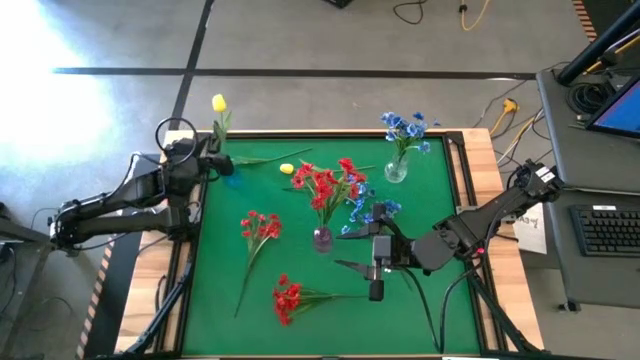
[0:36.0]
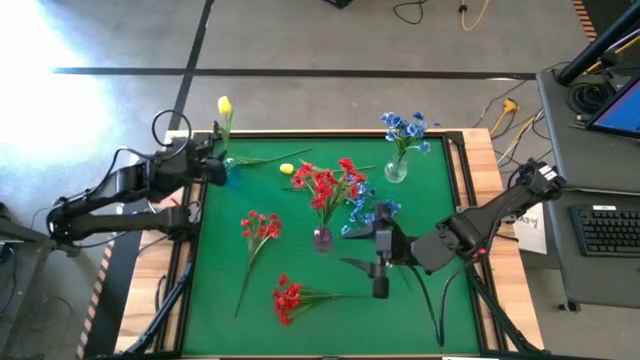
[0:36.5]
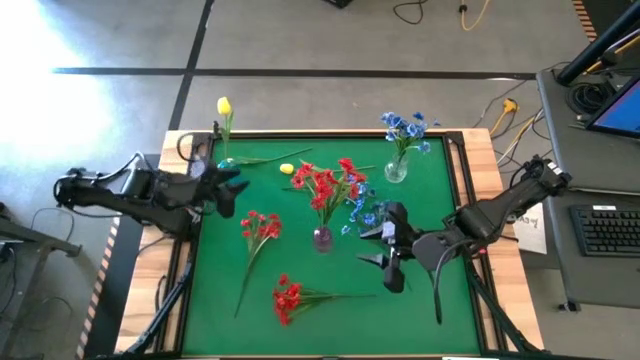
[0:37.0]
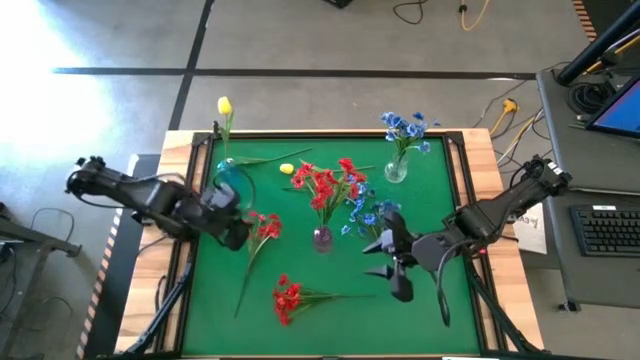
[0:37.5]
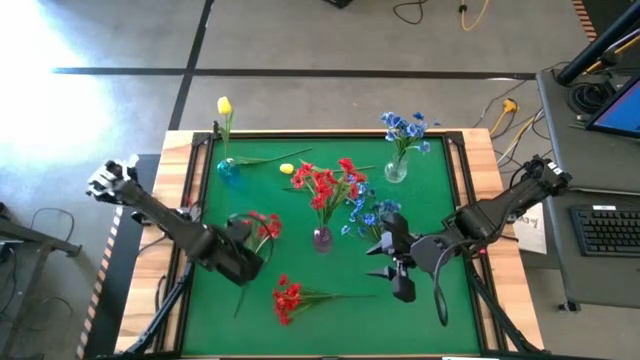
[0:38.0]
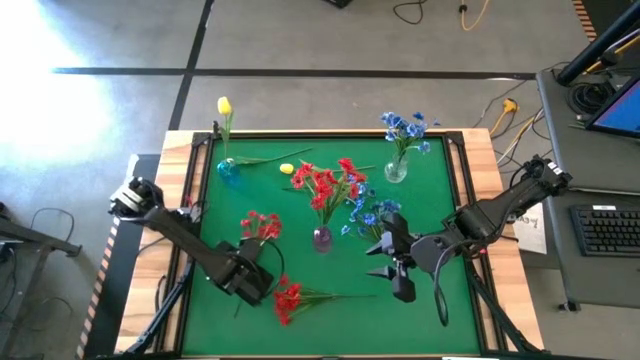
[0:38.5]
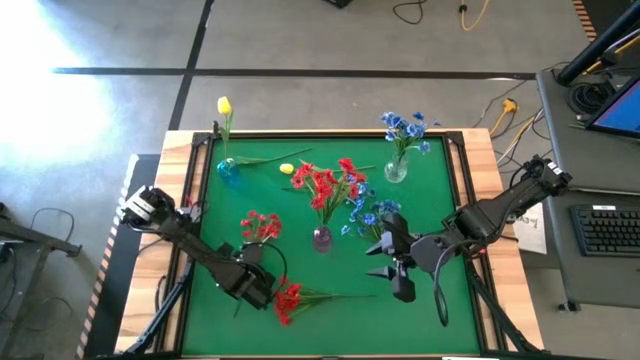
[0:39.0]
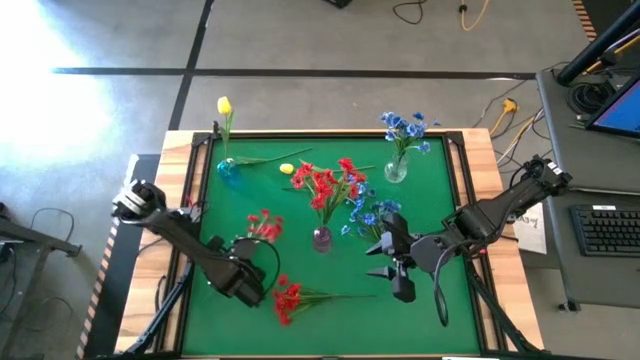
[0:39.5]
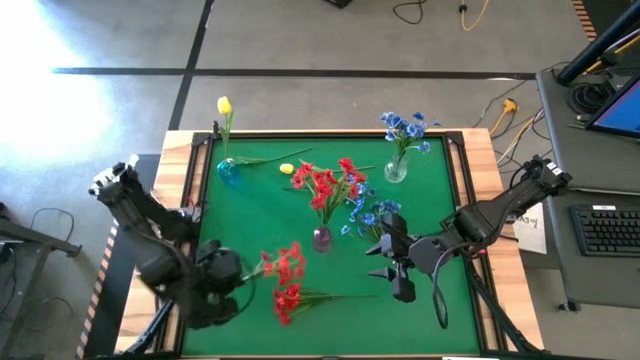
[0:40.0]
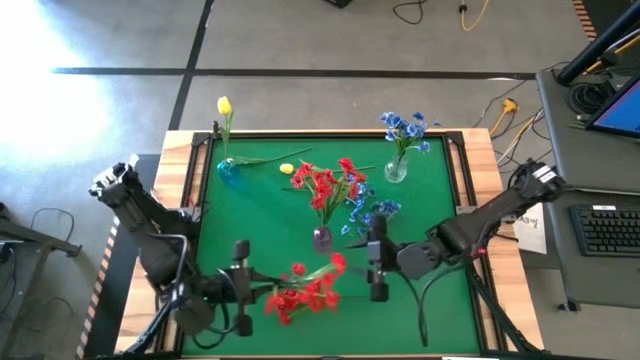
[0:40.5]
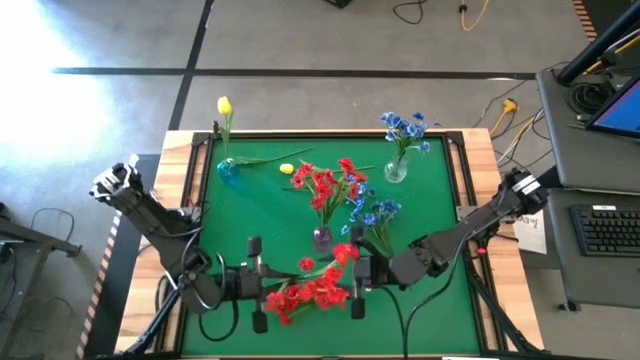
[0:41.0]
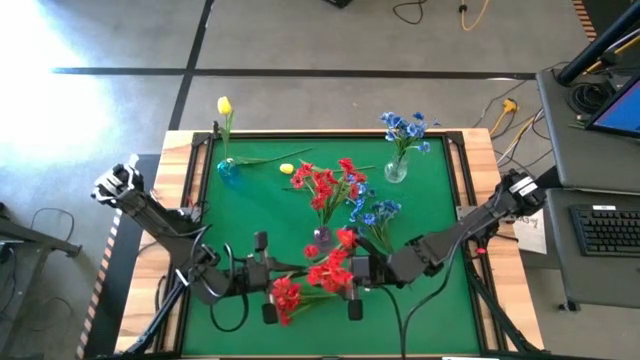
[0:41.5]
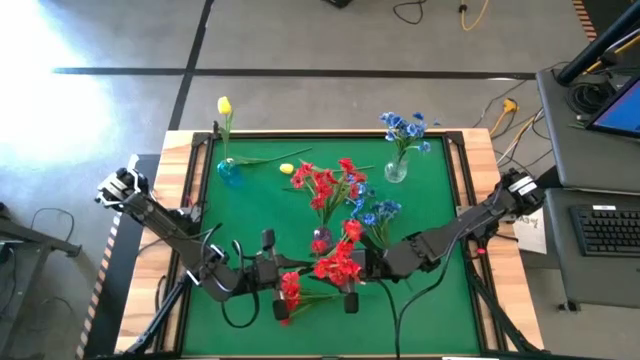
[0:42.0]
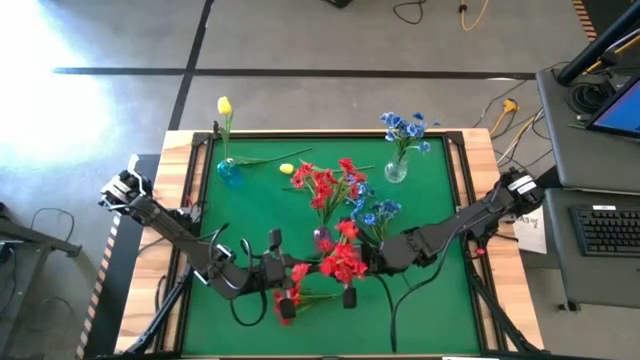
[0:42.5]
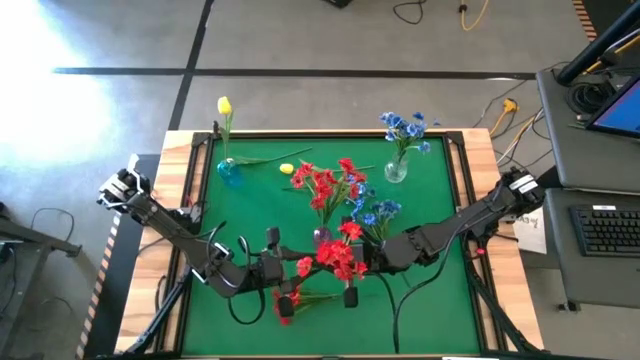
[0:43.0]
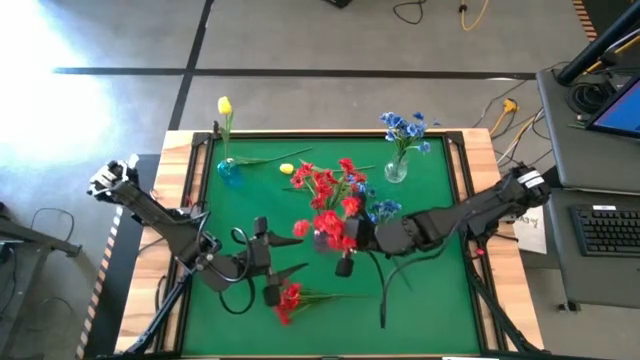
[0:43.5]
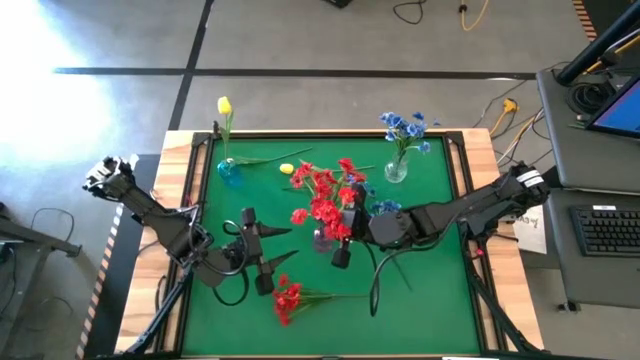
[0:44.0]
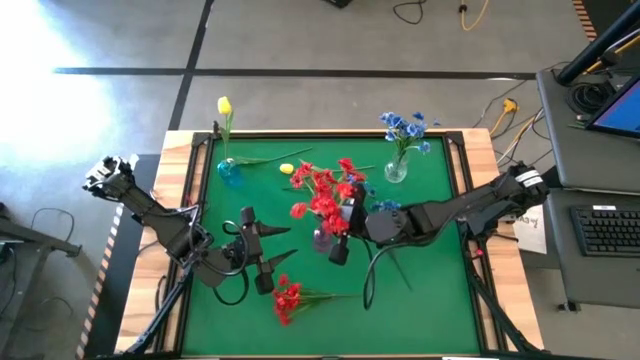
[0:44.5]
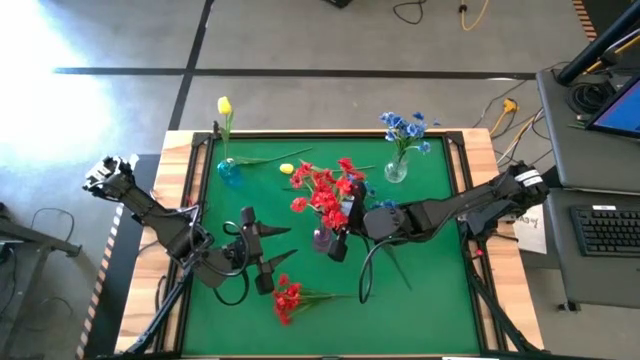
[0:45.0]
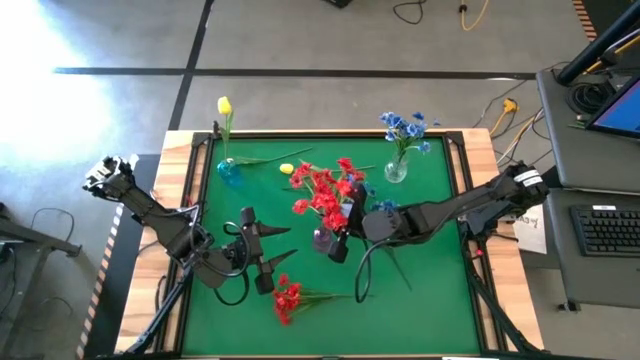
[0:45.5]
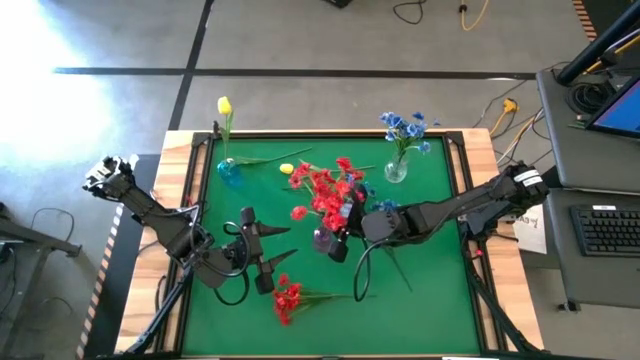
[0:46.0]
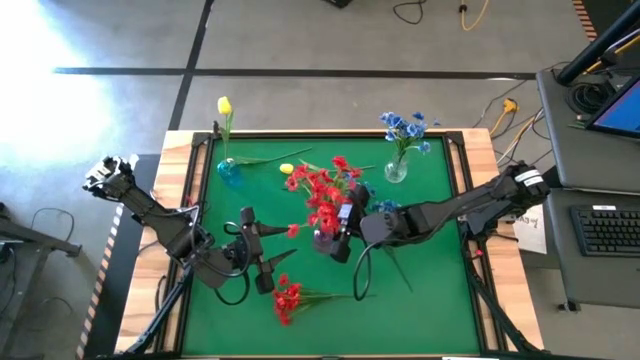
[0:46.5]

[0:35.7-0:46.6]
Task: Sort flowers into vase by color
Put the left red flowers into the purple vase

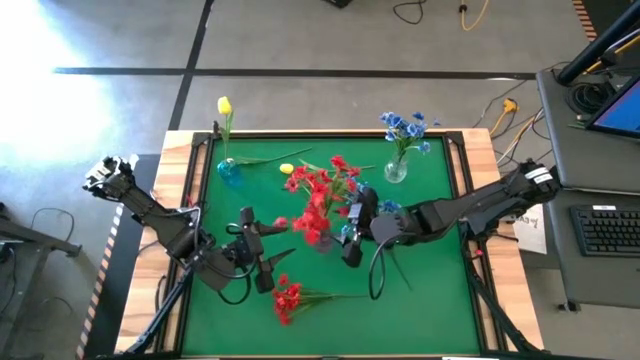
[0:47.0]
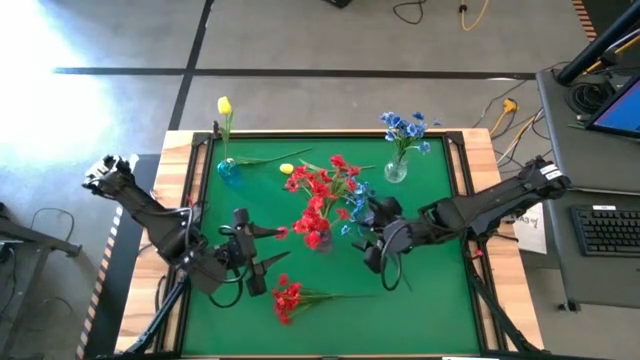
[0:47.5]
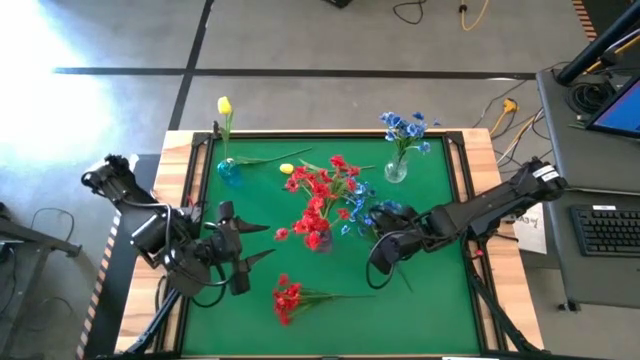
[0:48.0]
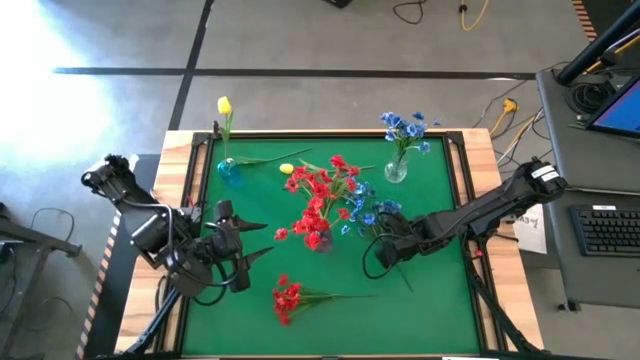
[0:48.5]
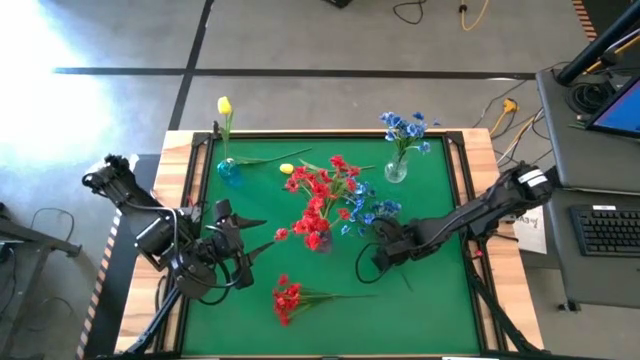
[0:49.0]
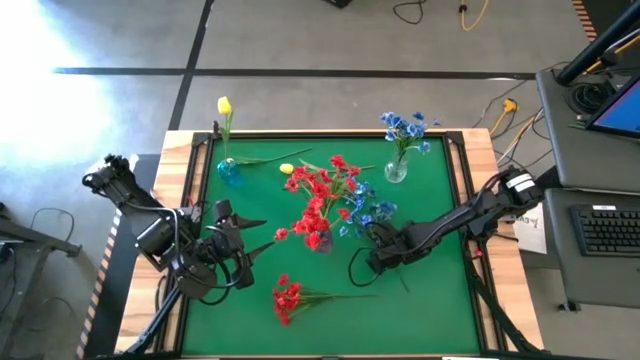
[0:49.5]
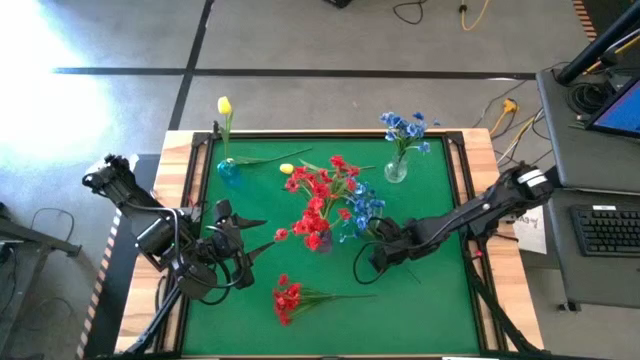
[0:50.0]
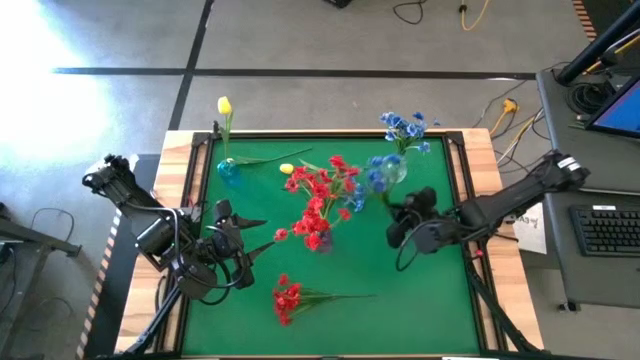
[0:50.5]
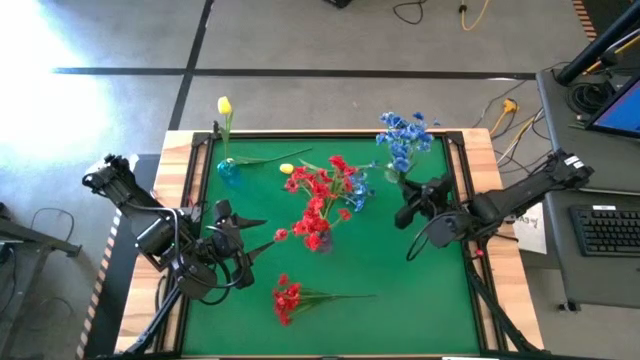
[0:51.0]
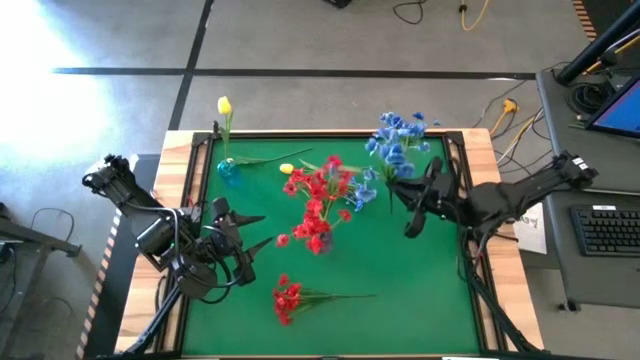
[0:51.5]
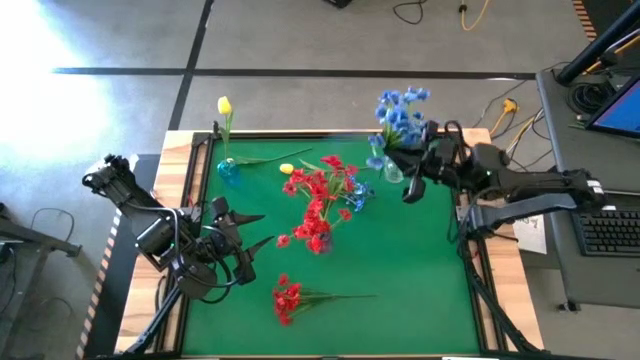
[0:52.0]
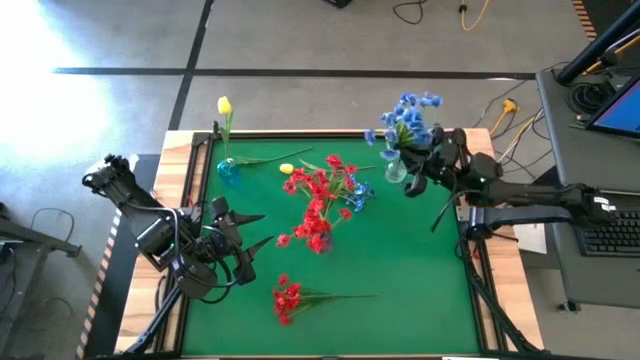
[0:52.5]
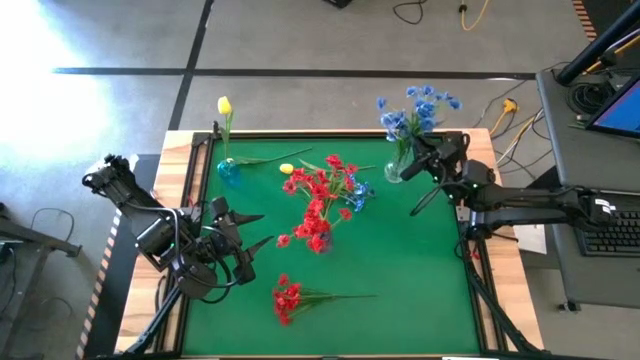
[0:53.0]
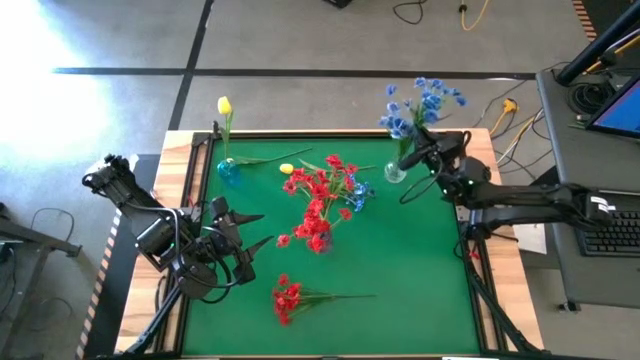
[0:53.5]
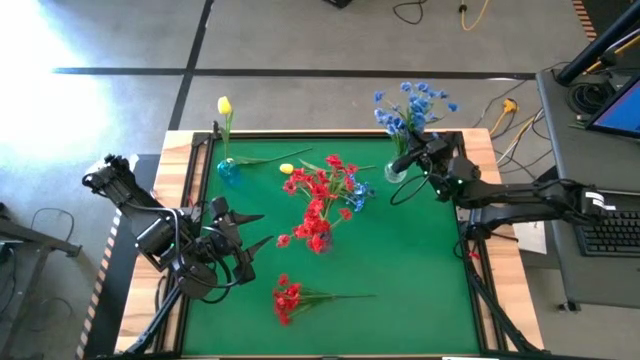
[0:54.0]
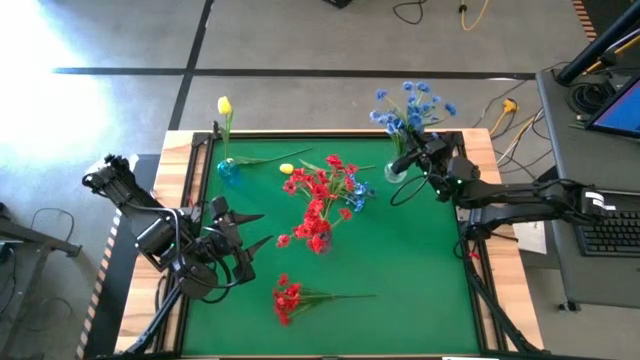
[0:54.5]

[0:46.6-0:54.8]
Put the bottom blue flowers into the transparent vase

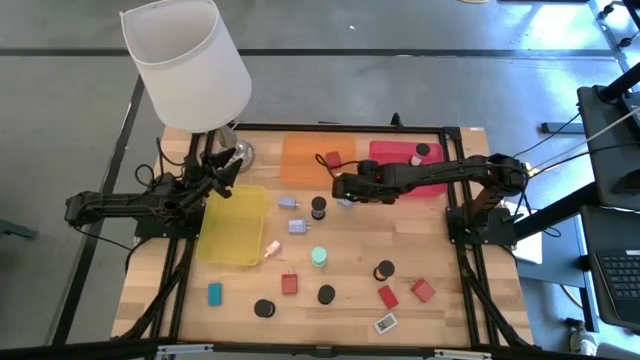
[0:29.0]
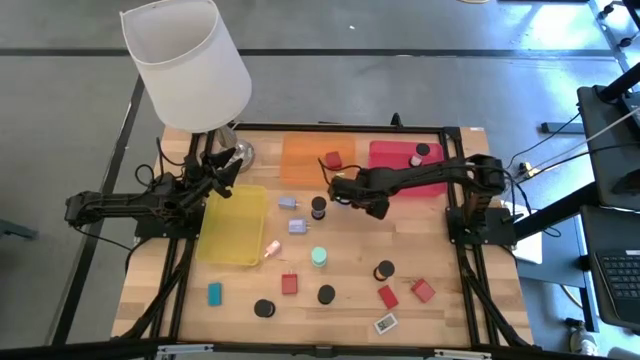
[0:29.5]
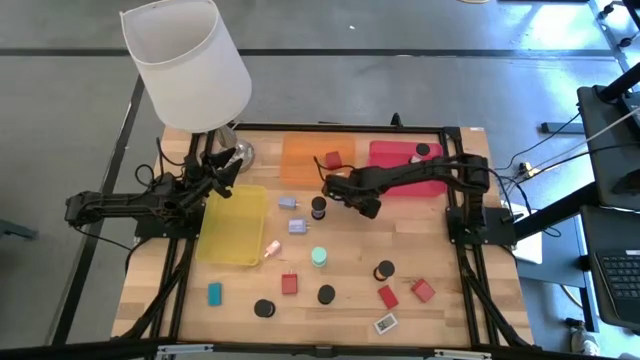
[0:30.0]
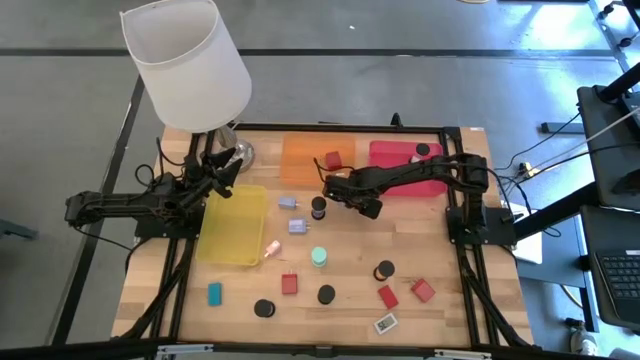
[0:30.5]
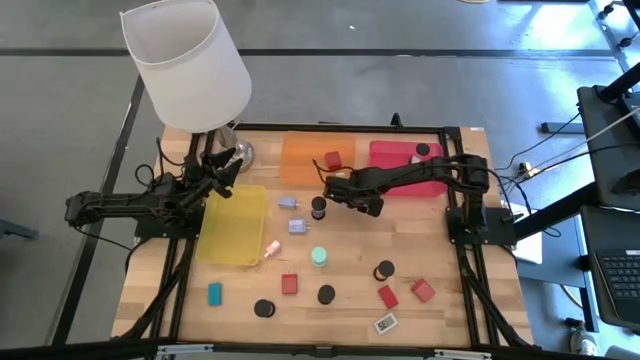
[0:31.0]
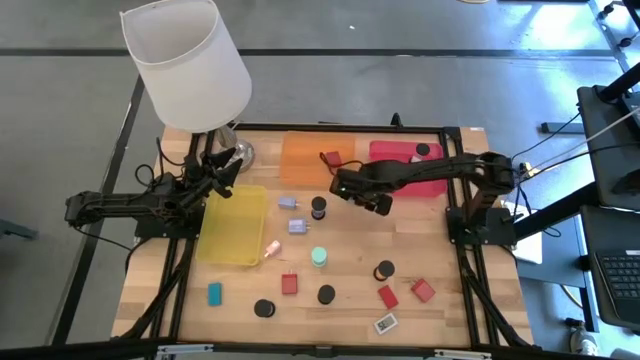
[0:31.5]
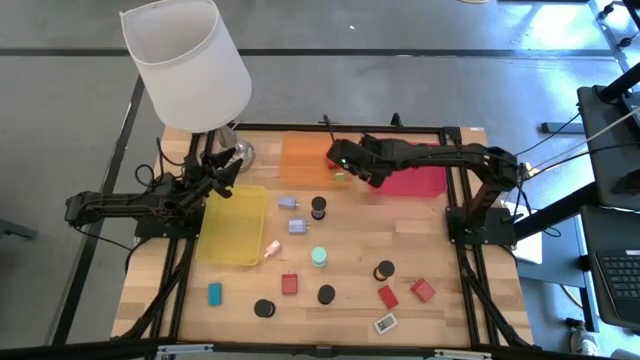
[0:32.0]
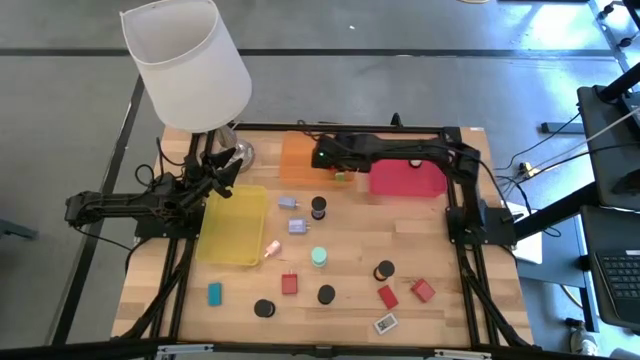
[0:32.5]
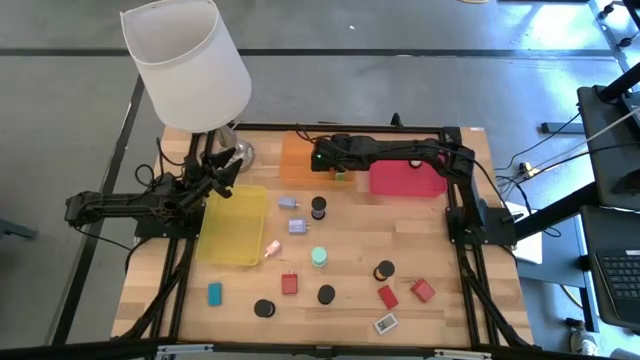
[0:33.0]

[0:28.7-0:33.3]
Task: Pick & Place Office items
Put the blue charger adapter into the orange bin
